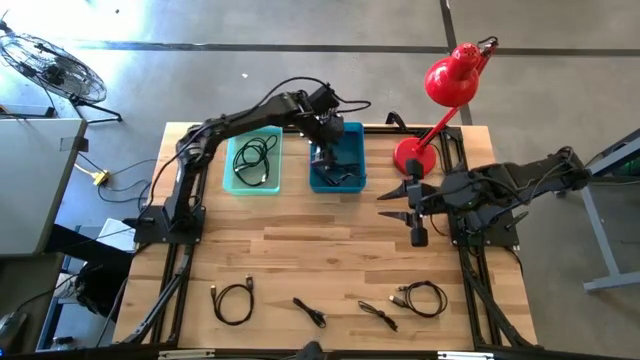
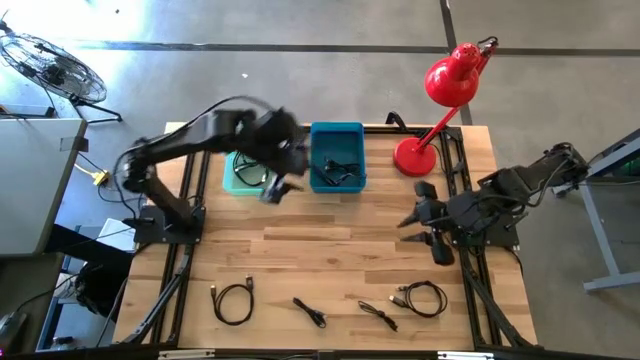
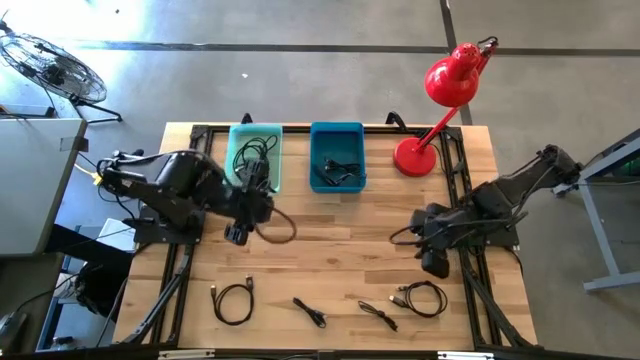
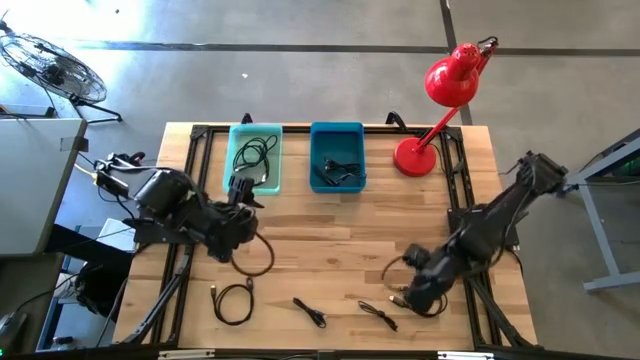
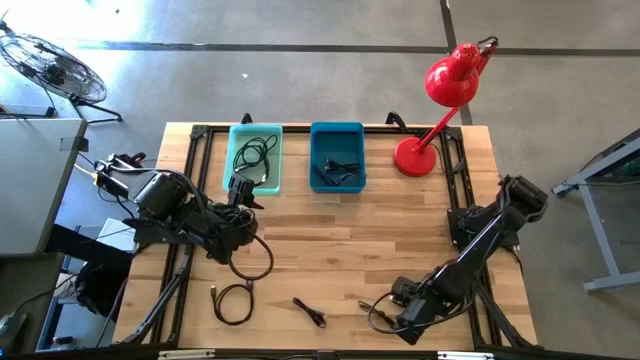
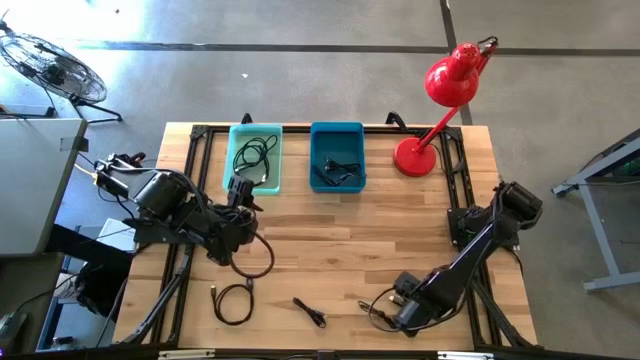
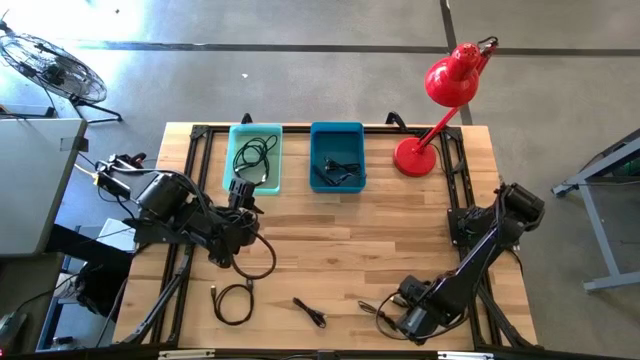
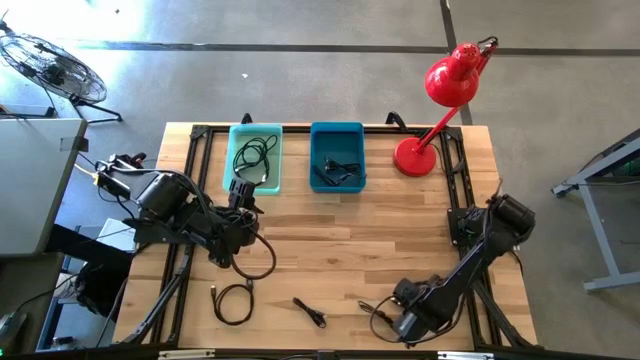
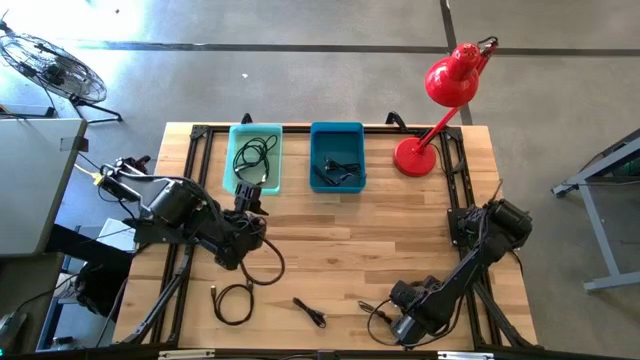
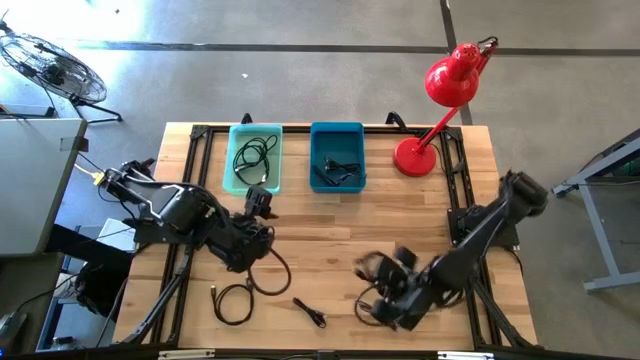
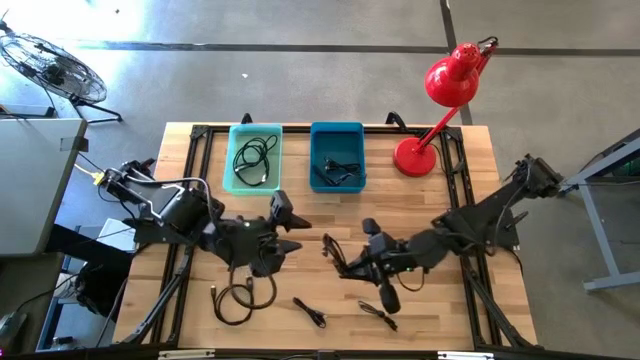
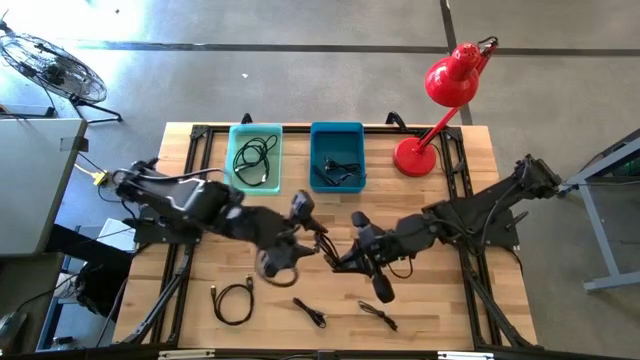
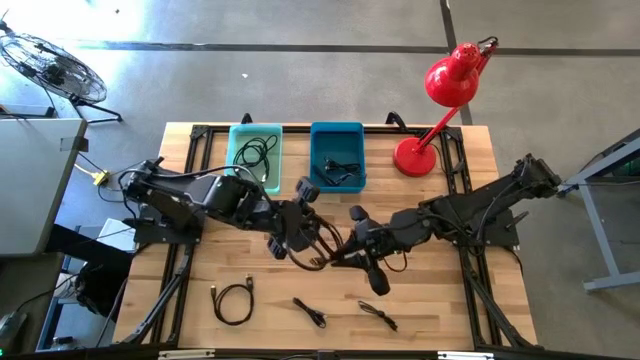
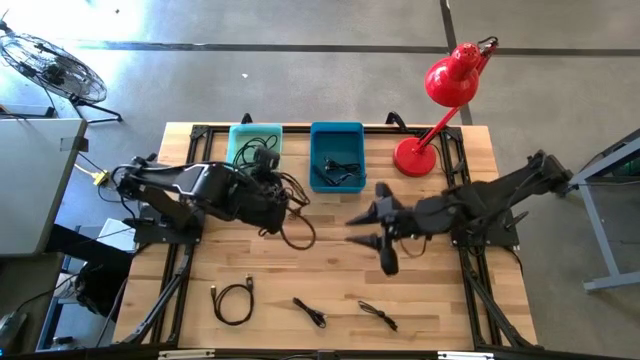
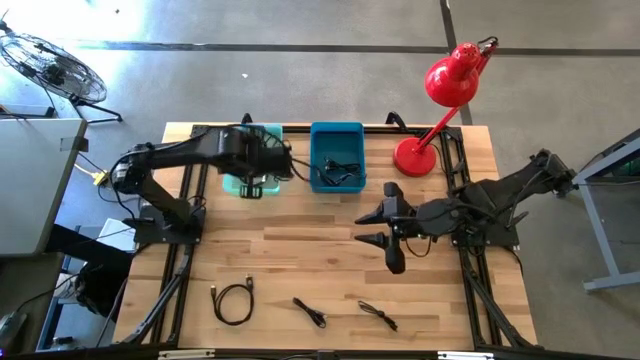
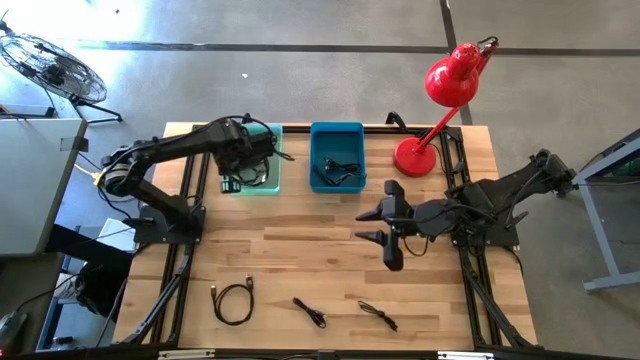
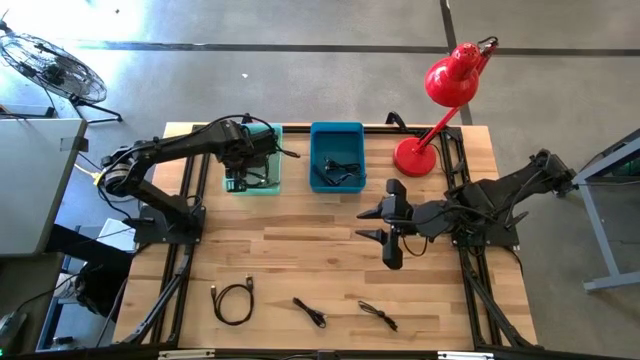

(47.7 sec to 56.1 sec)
Task: Pick & Place USB Port
Put the black HDMI cable into the green bin

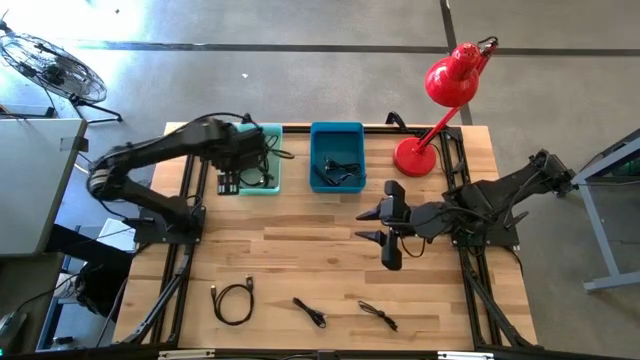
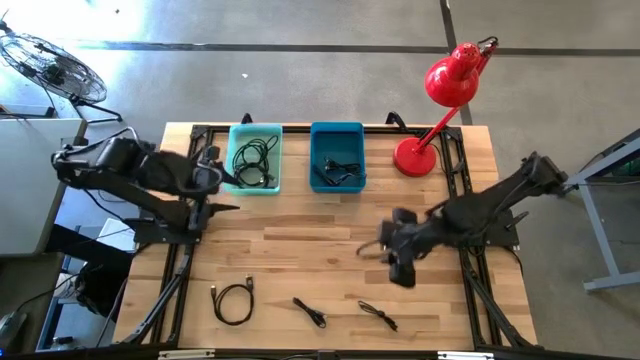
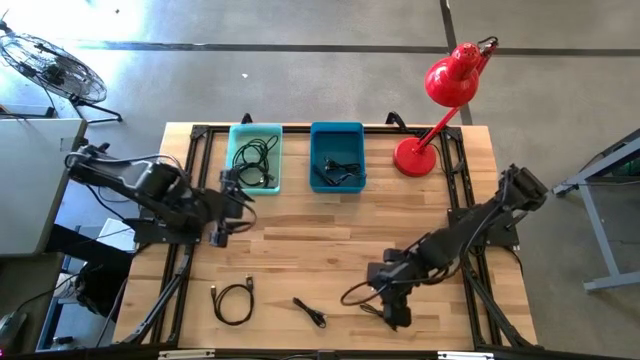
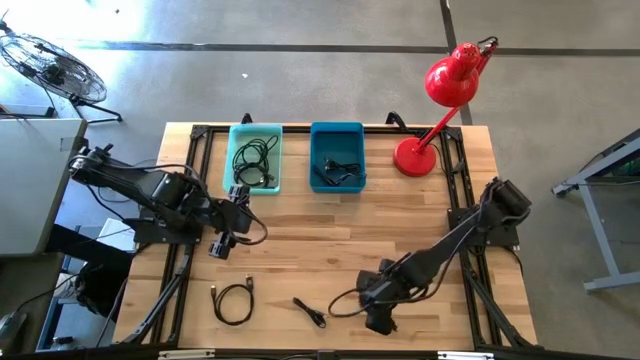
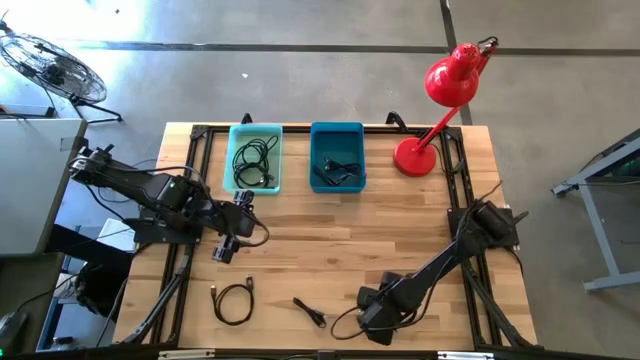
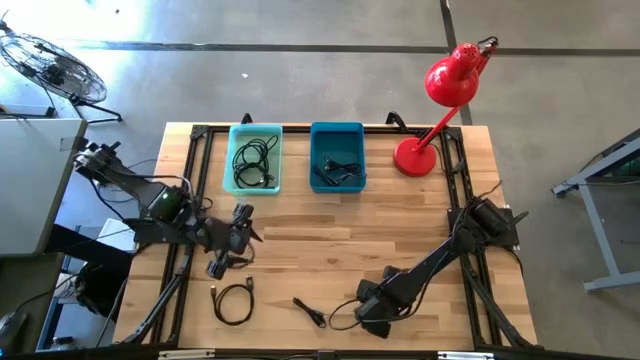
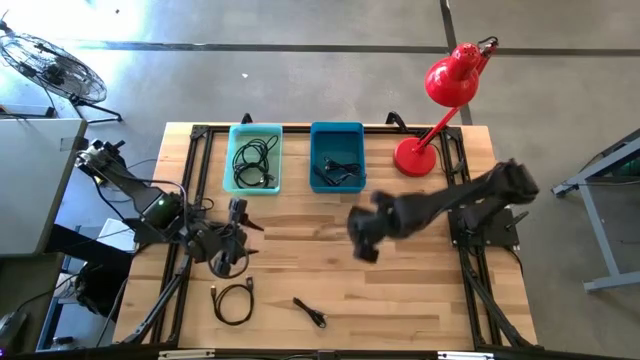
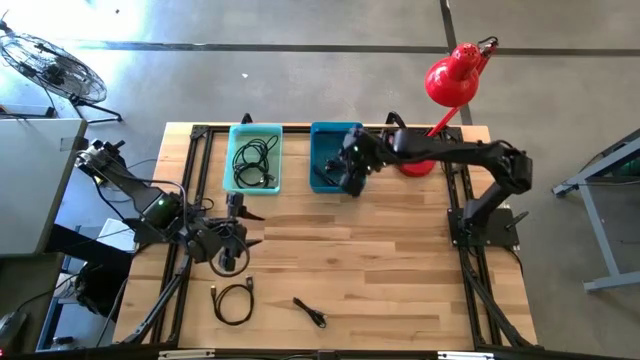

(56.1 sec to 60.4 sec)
Put the black USB cable into the blue bin

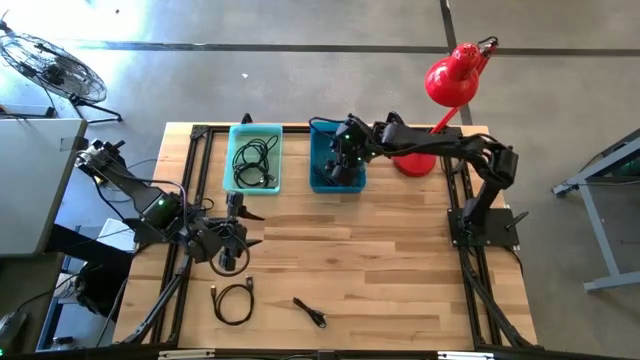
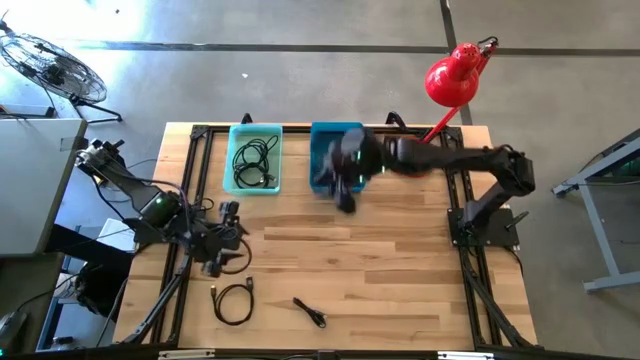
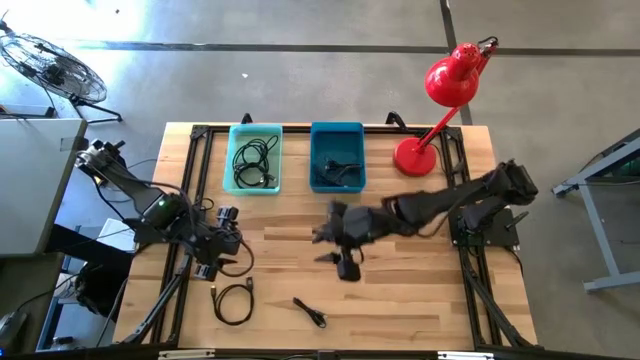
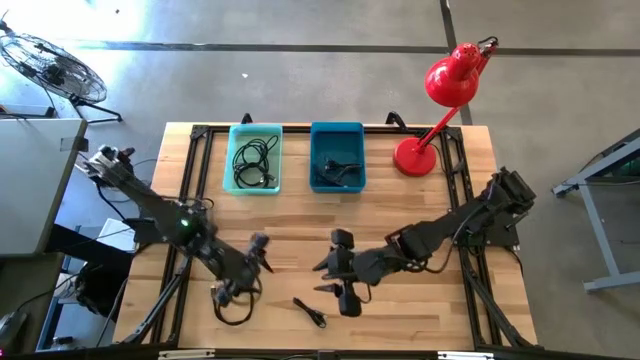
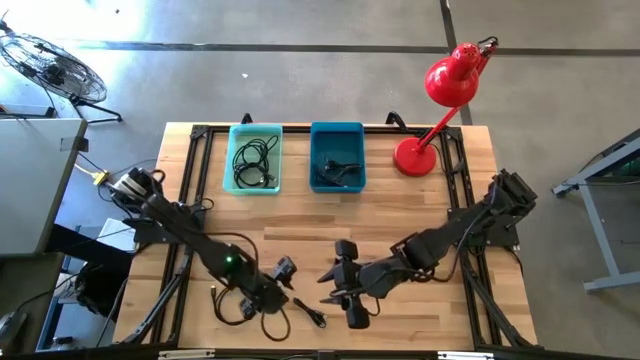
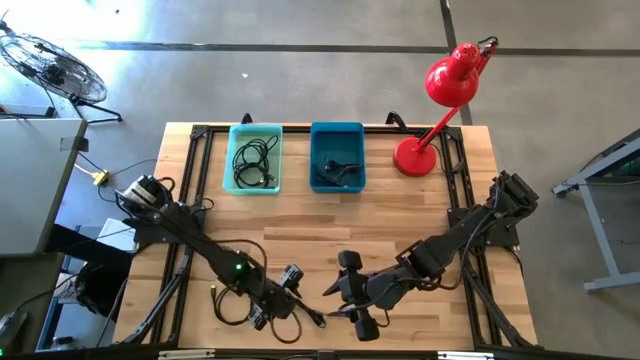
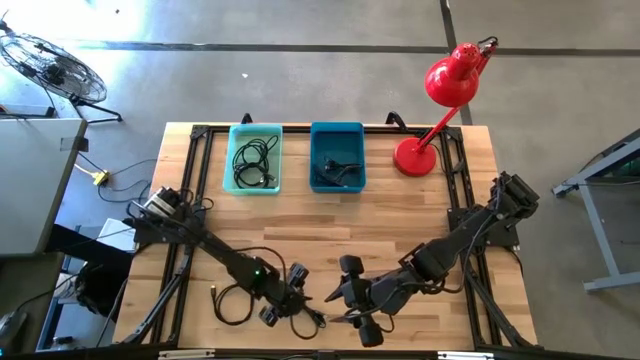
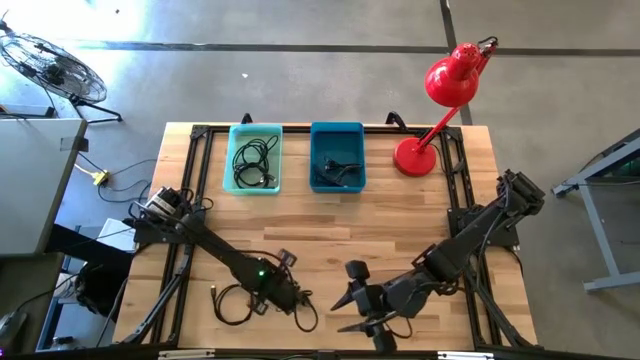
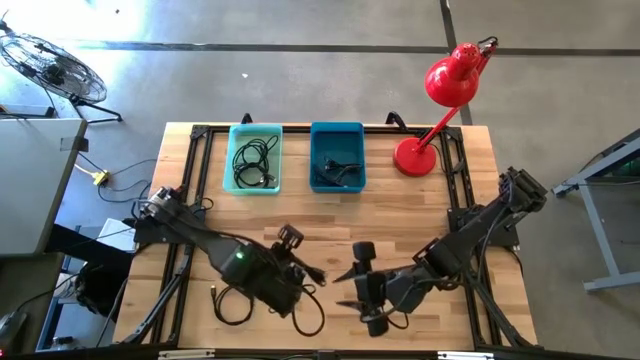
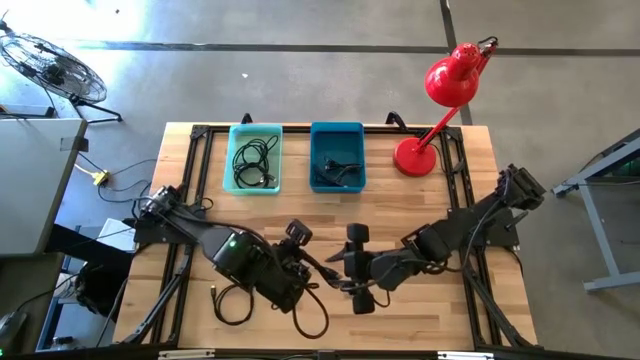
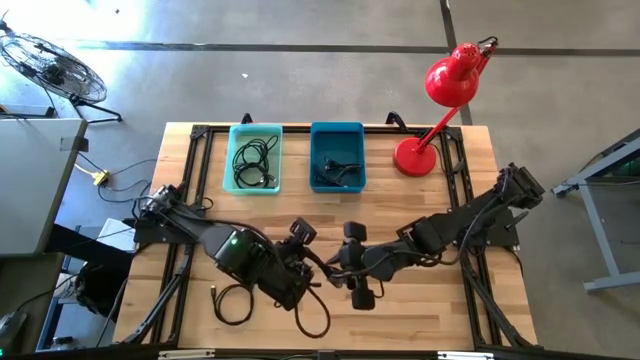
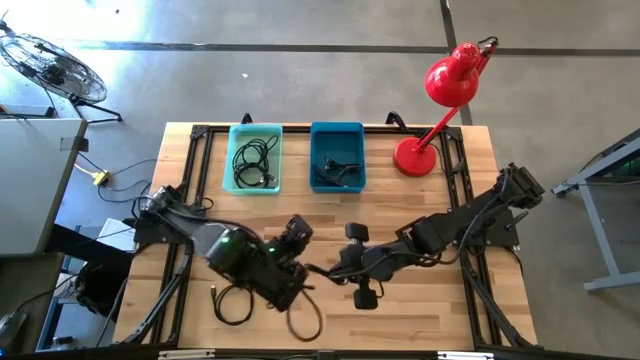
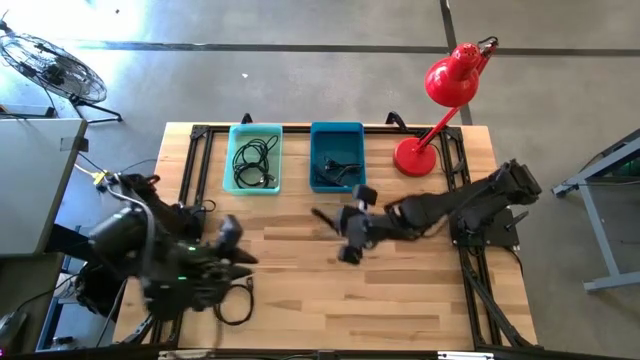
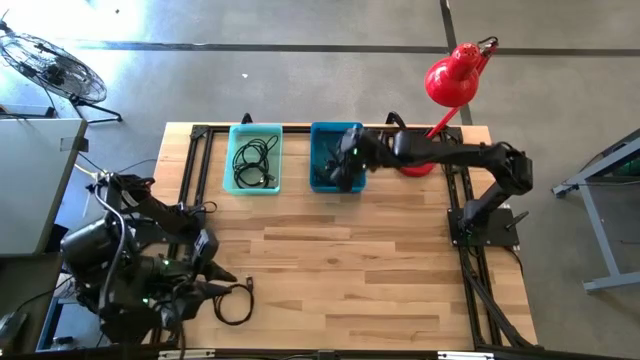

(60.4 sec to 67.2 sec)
Put the black USB cable into the blue bin

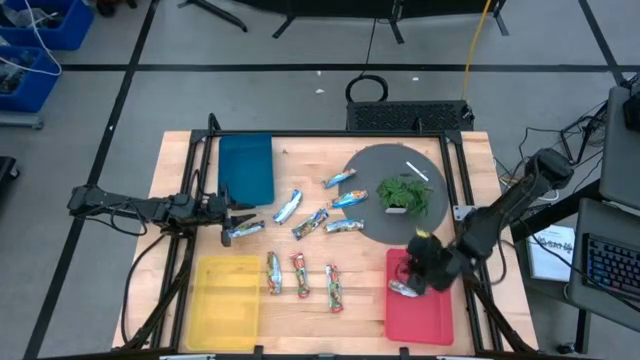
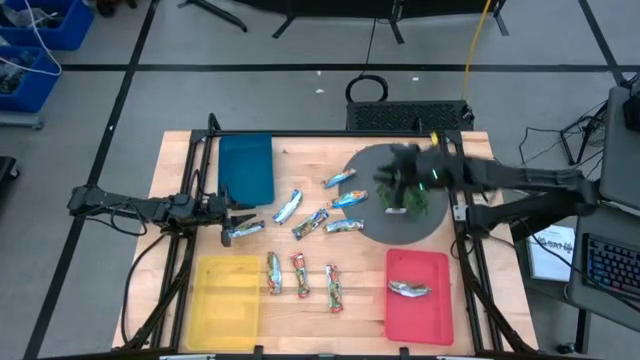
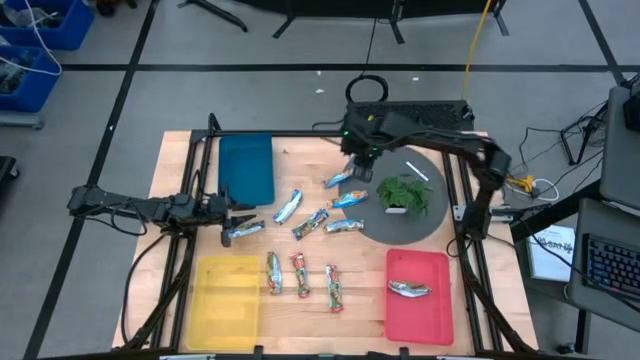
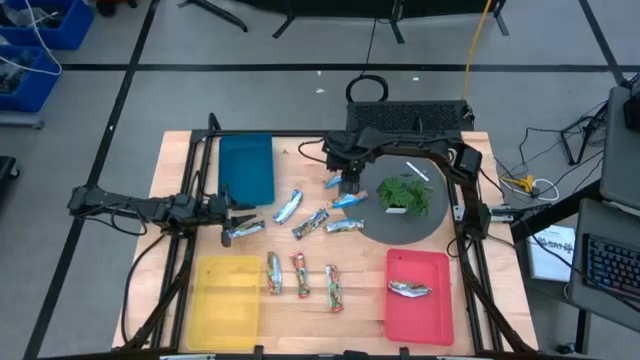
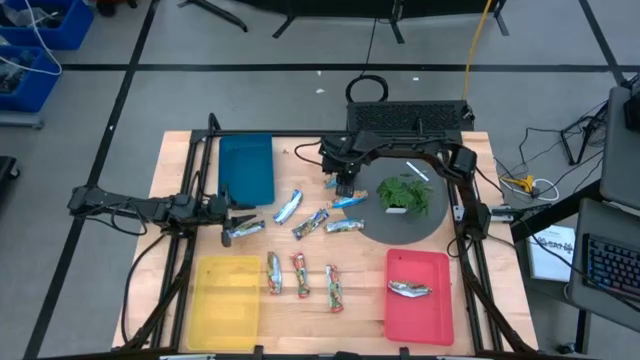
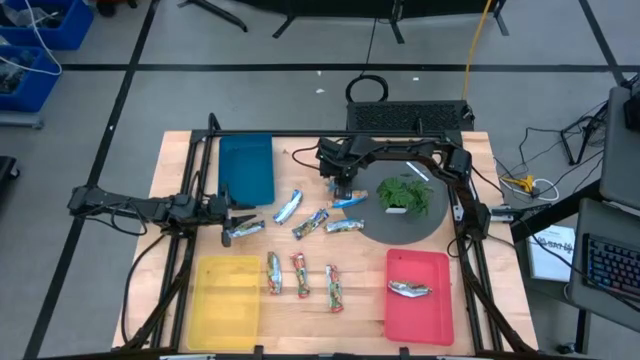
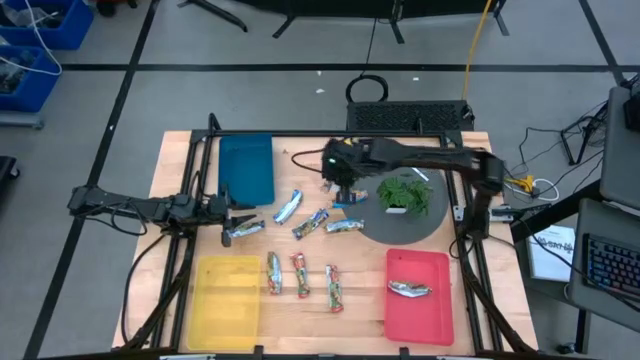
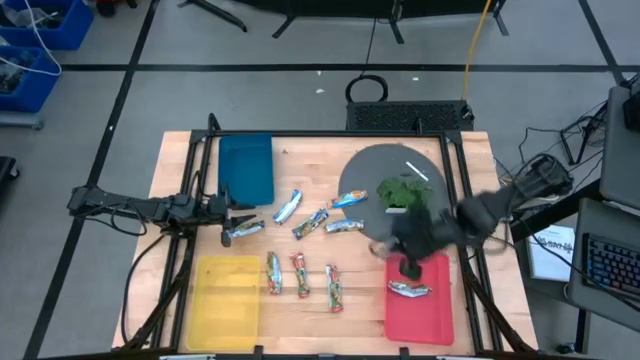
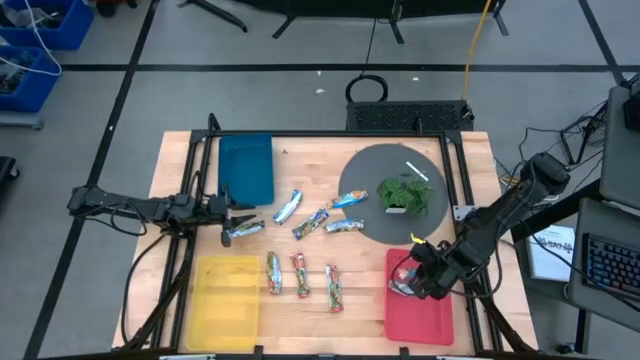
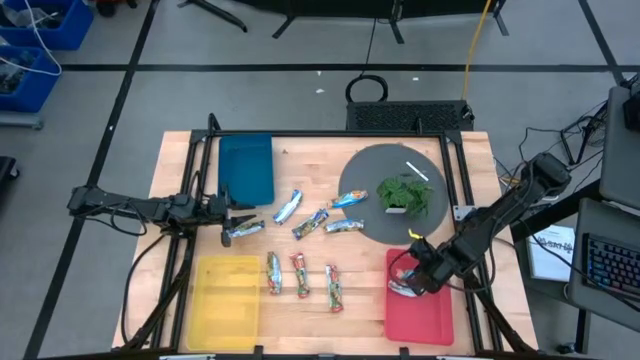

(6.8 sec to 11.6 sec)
Task: Pick and place Granola Bars by type
Put the yellow granola bar into the pink bin
